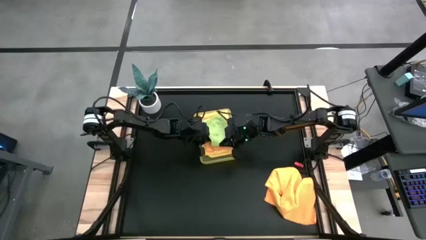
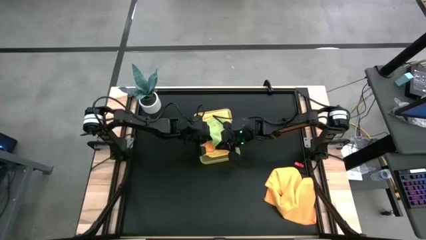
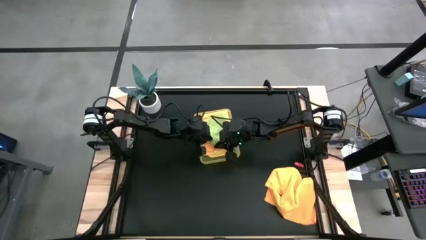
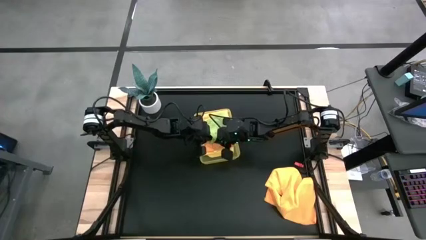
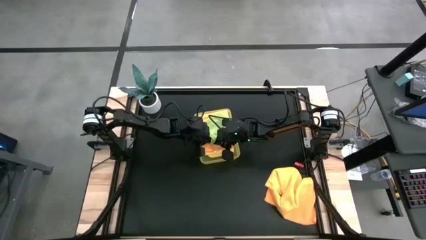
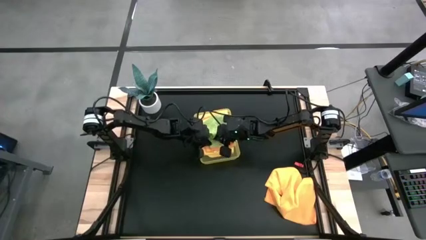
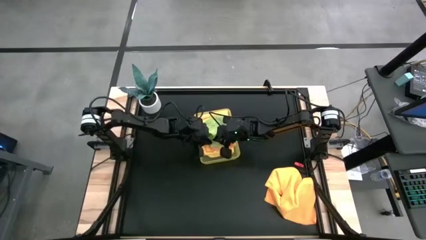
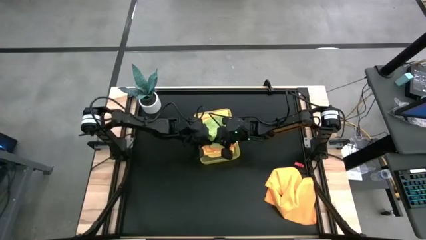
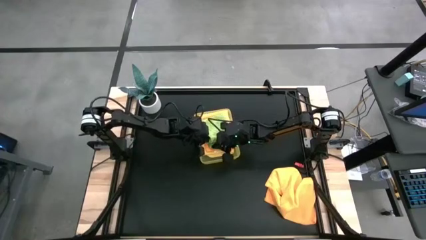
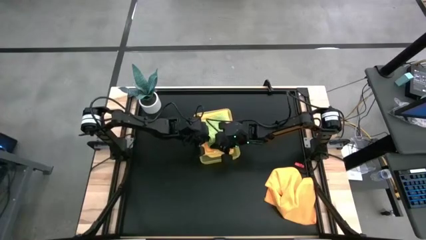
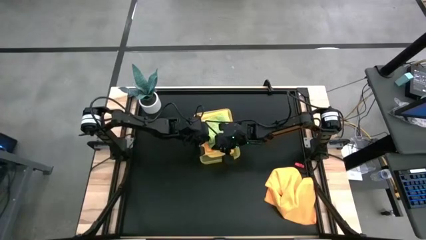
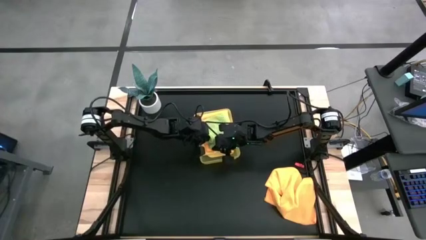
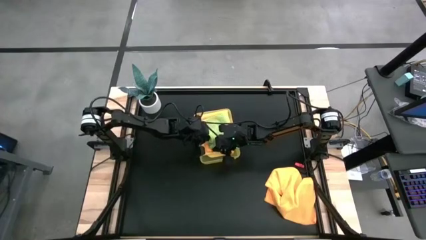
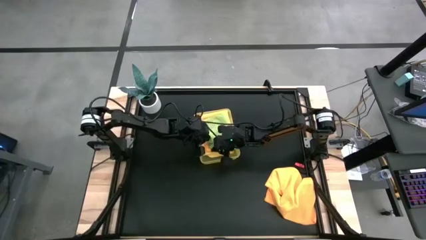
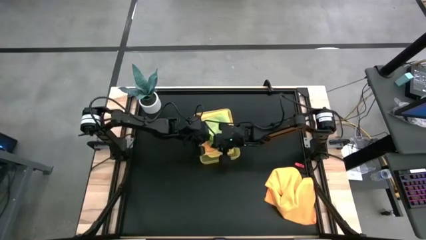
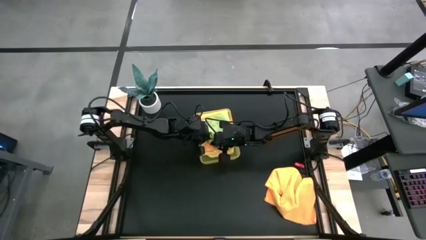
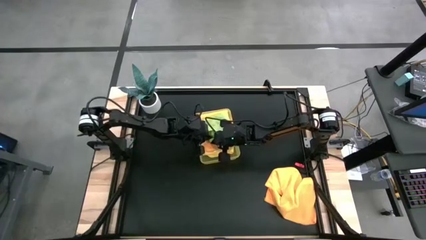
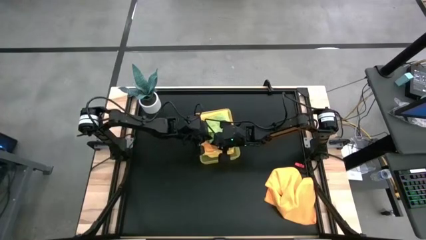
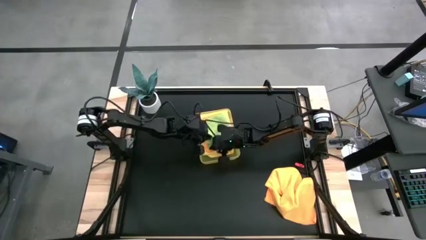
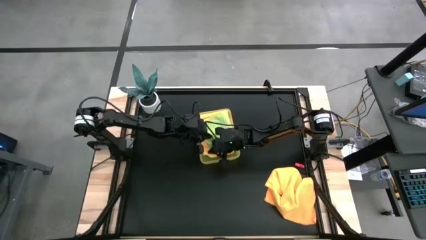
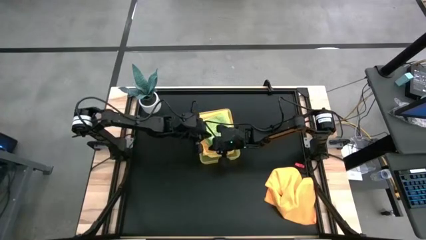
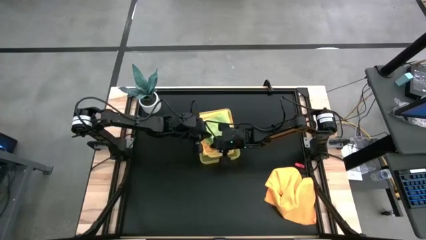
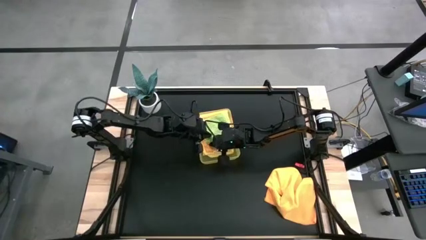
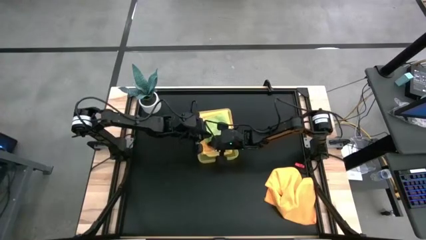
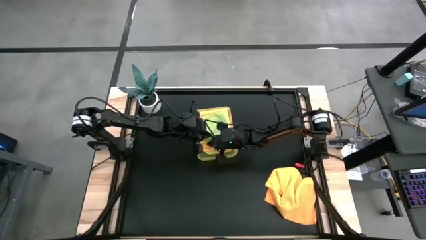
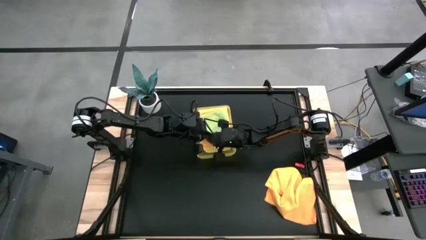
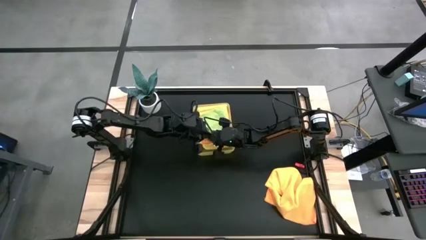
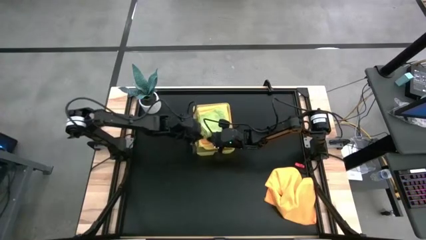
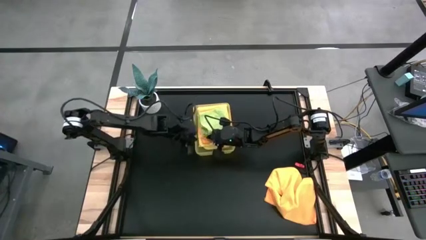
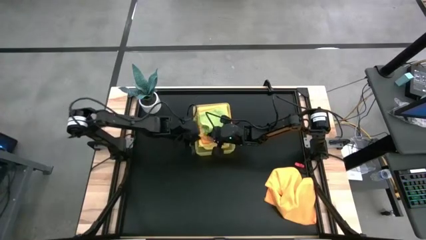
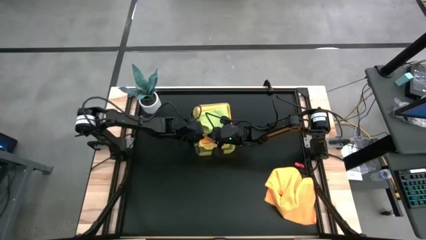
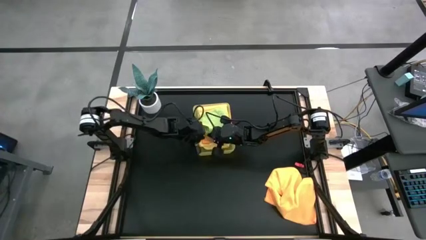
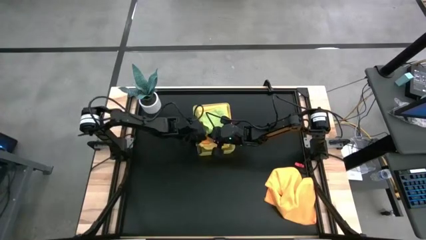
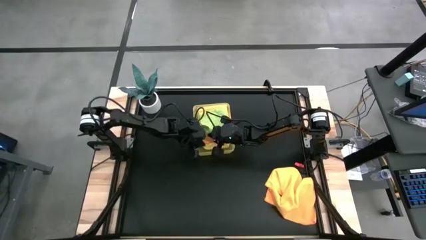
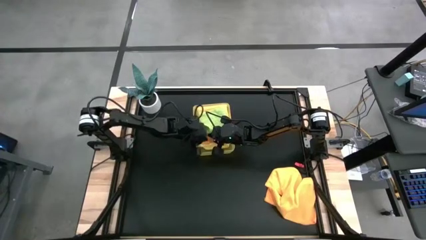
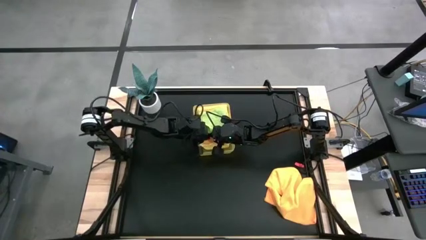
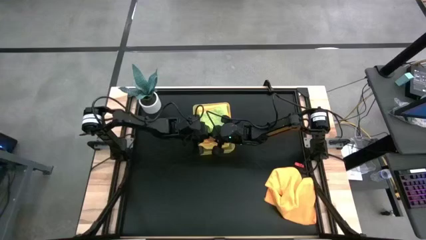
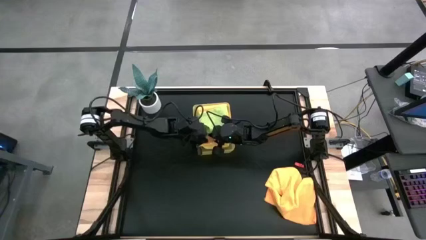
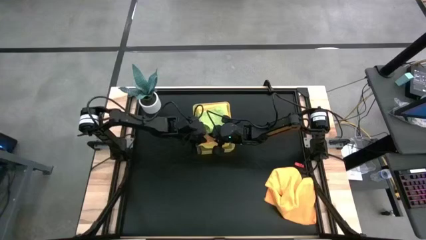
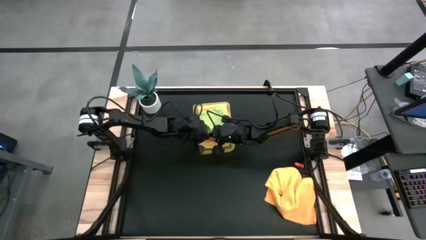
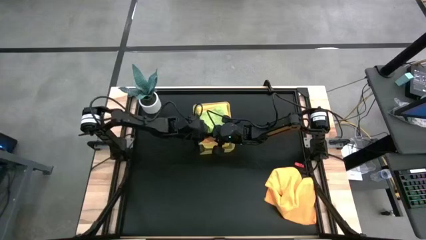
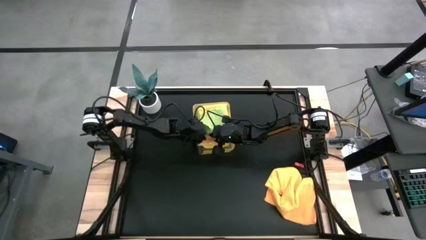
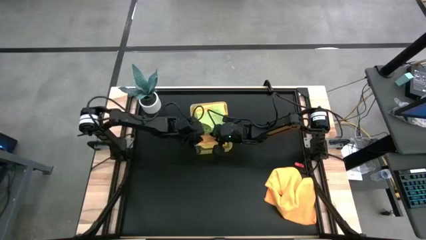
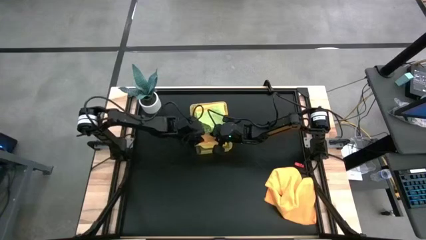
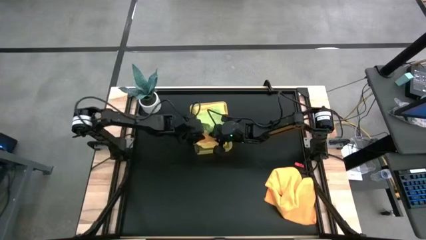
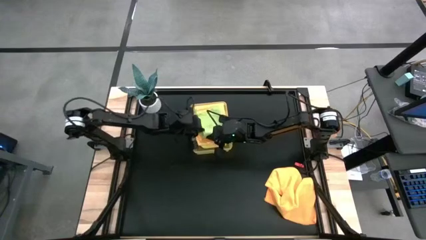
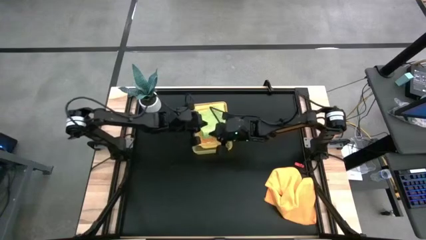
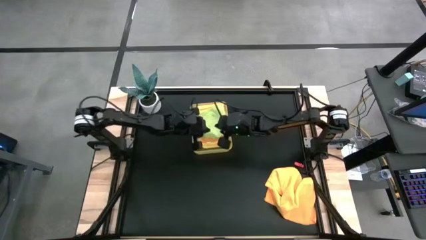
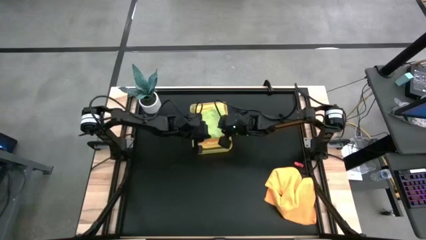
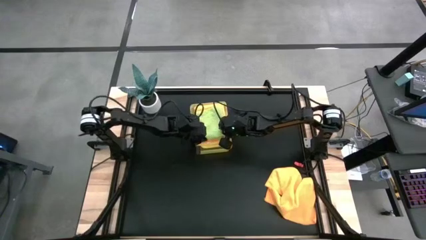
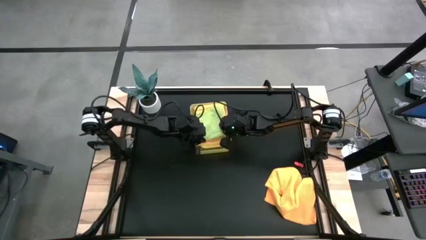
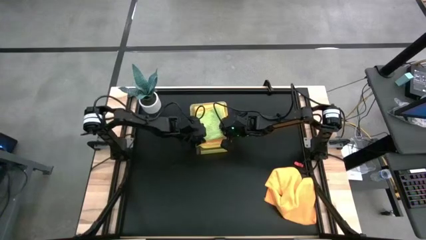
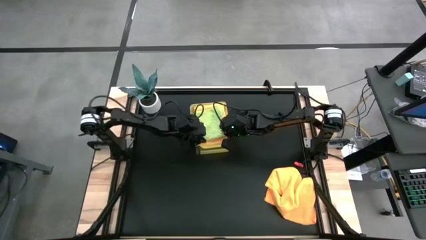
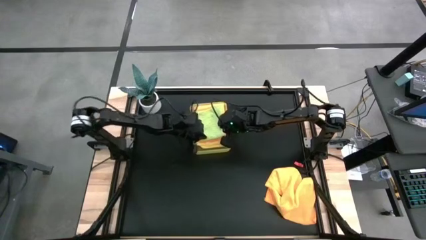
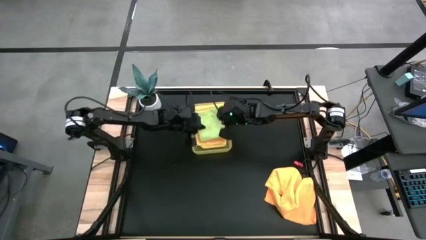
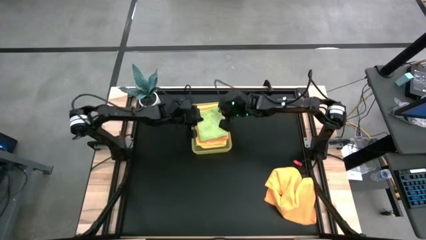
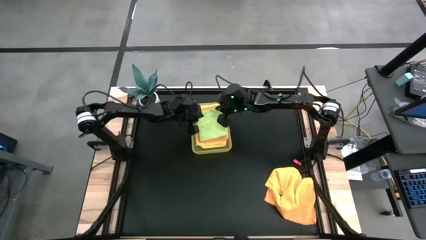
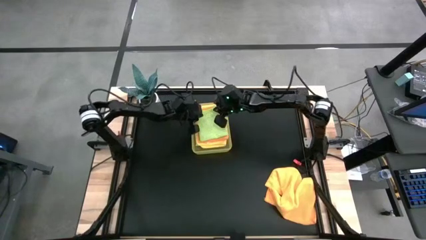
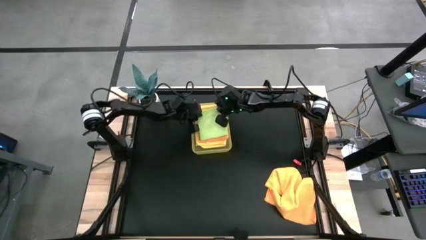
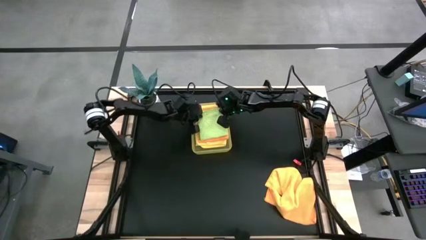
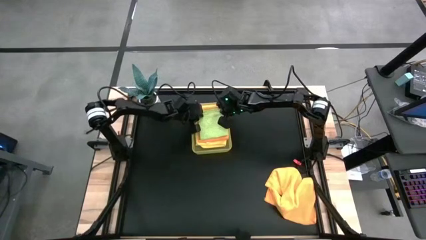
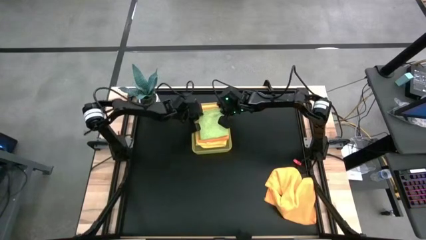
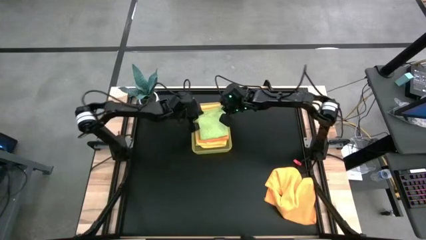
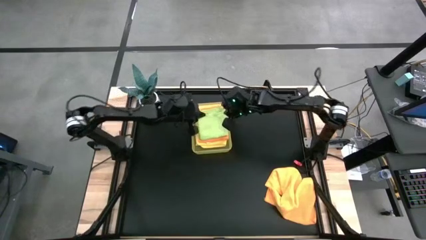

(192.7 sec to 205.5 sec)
Task: Fold microfiber towels
Put the folded green microfiber fiber cloth yellow microfiber cloth into the bin

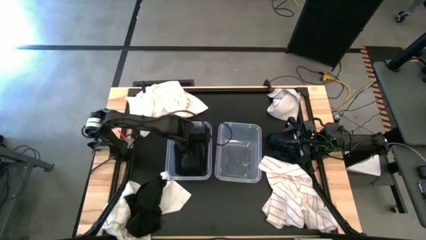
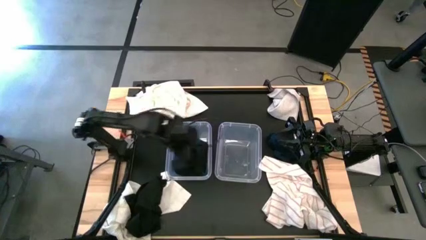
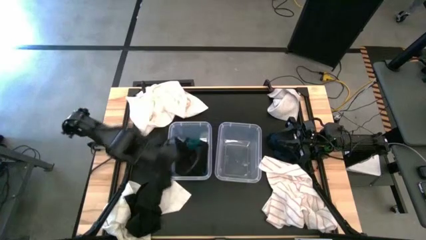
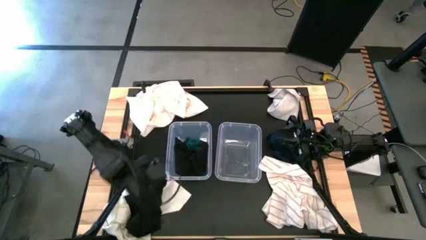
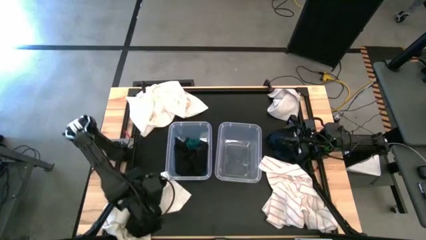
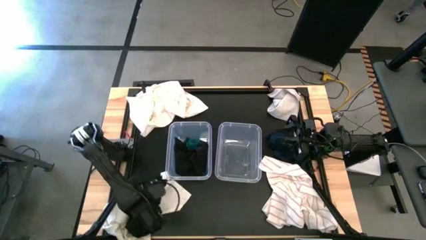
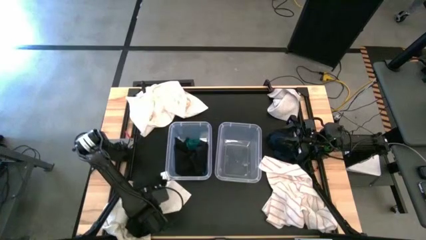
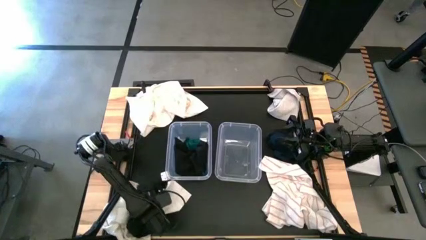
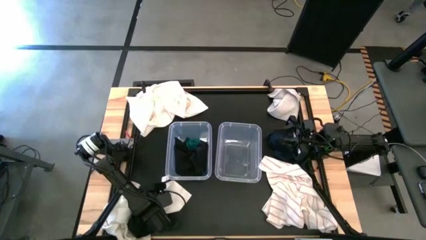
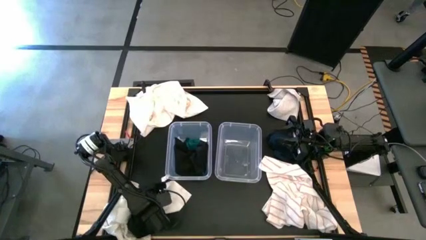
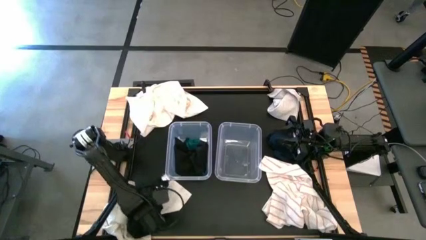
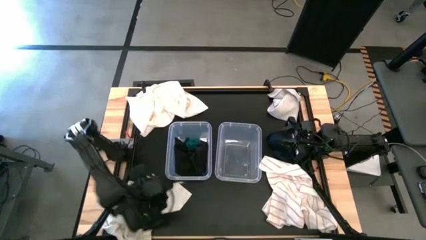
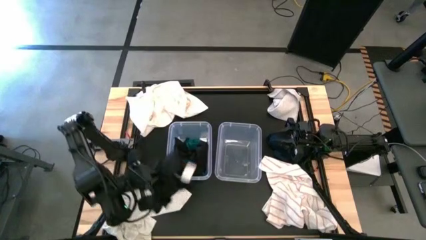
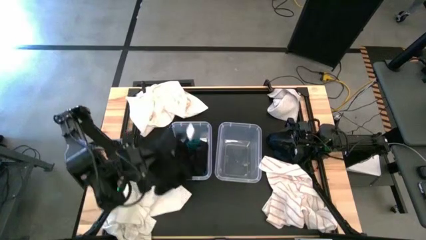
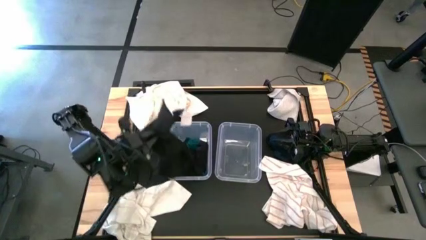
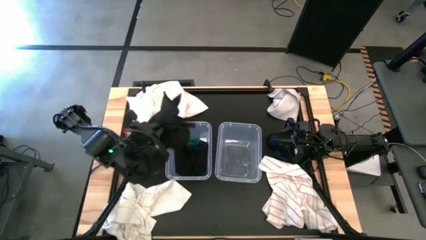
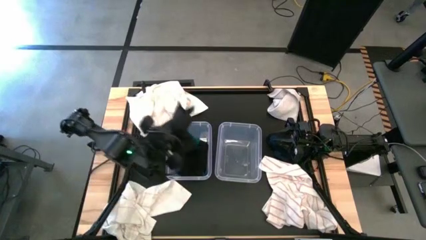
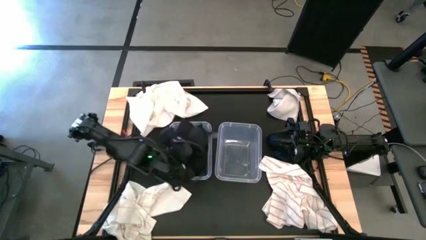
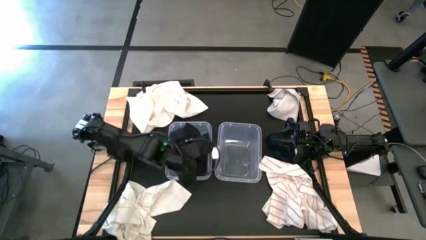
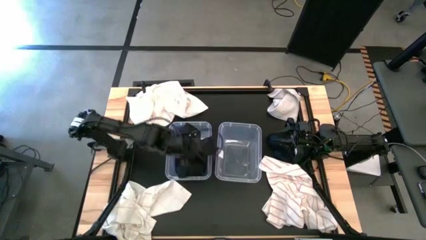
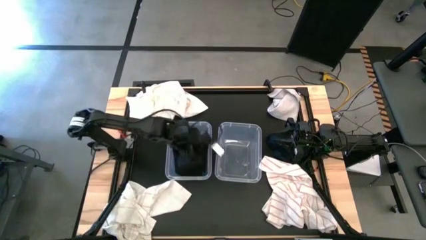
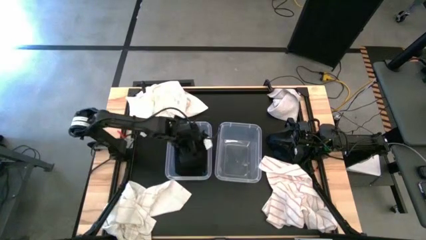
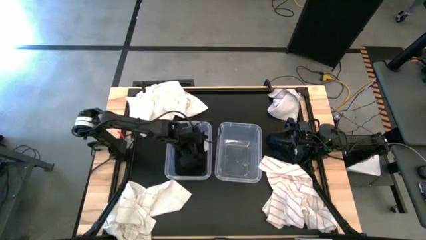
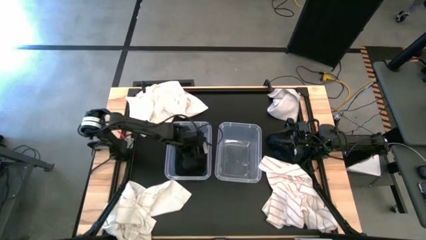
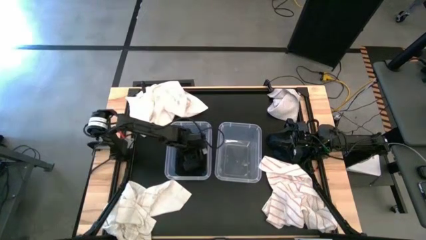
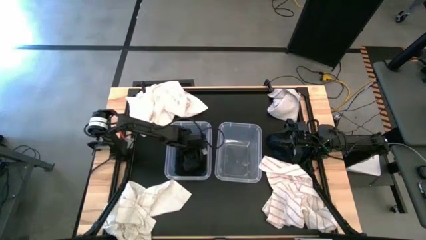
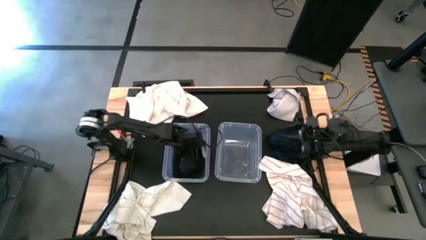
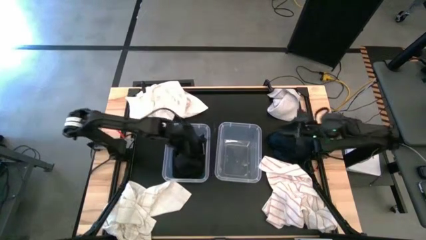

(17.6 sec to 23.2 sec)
Task: Sort towels by color in basket
Put the black towel into the left transparent bin
